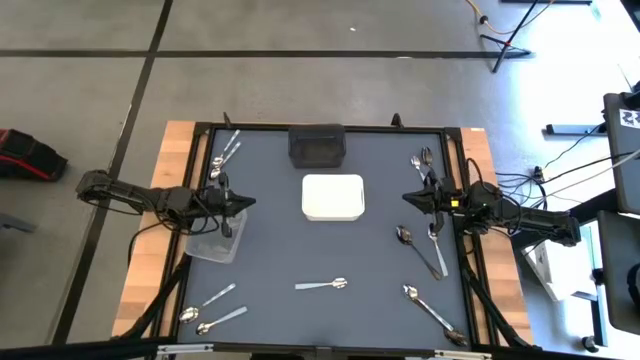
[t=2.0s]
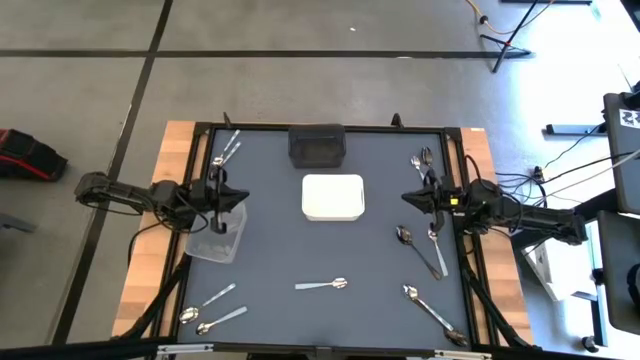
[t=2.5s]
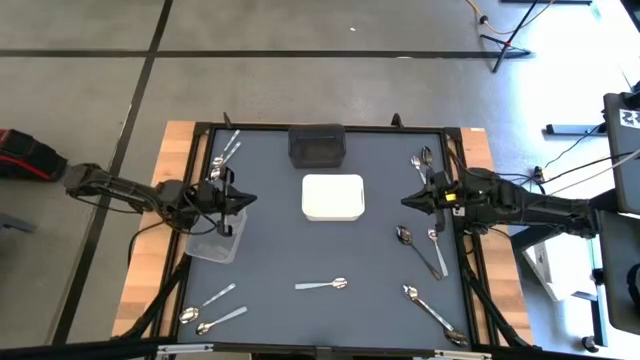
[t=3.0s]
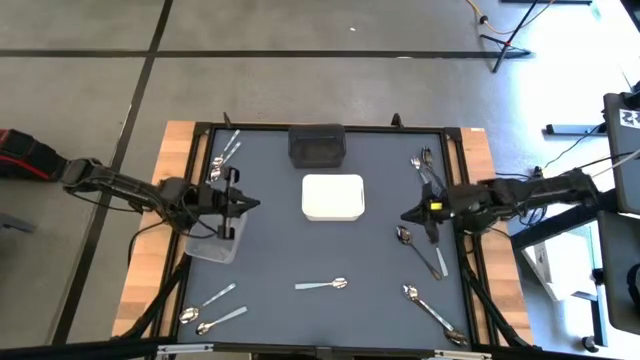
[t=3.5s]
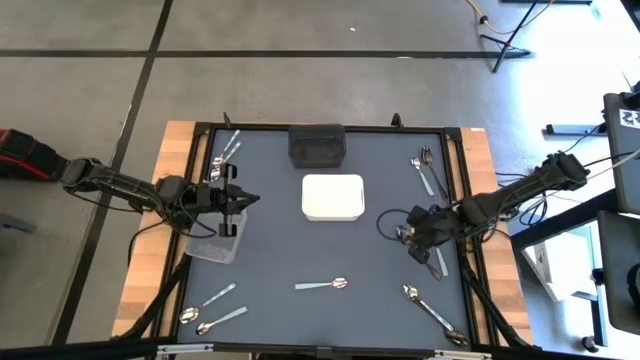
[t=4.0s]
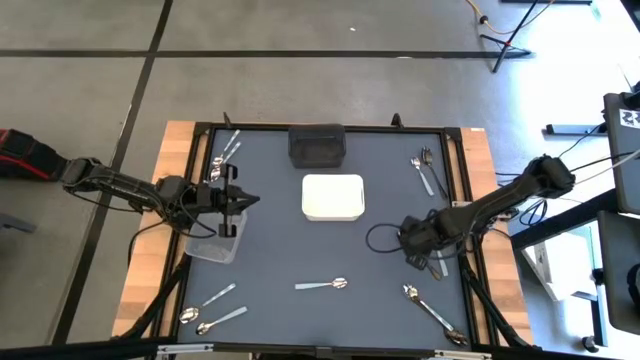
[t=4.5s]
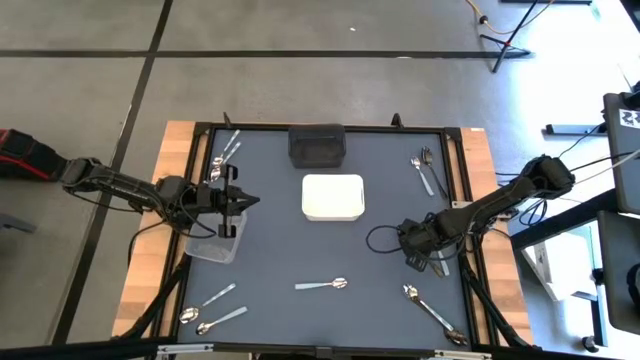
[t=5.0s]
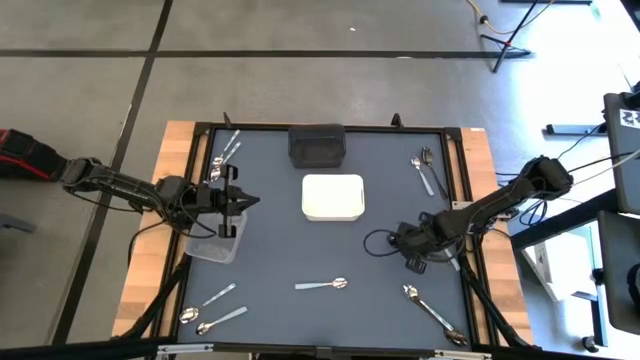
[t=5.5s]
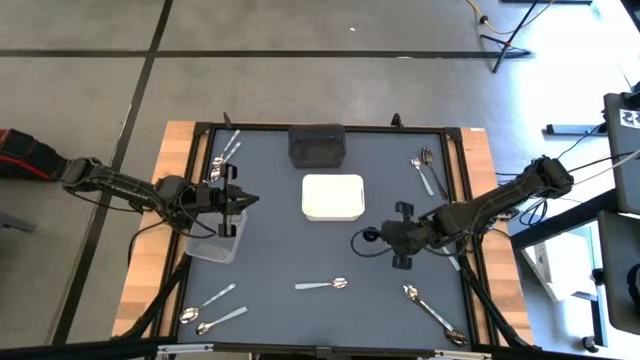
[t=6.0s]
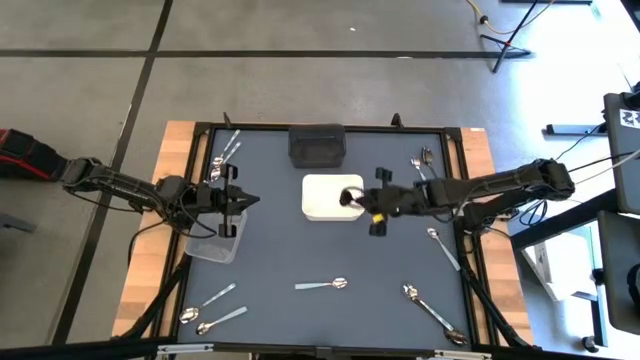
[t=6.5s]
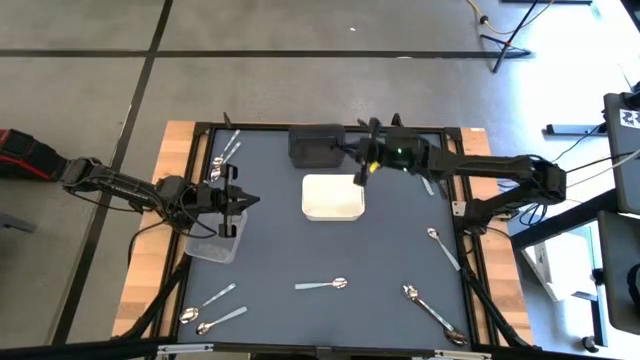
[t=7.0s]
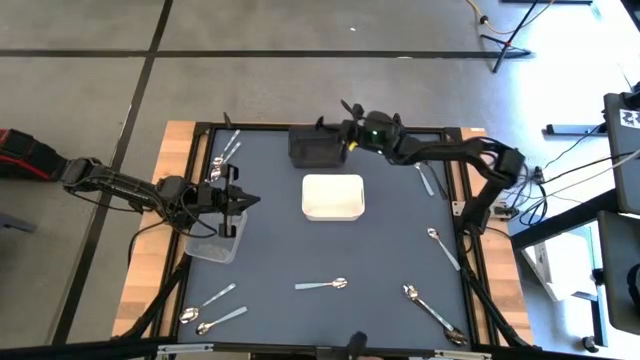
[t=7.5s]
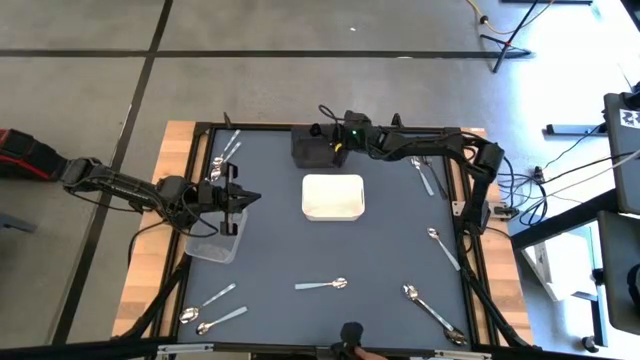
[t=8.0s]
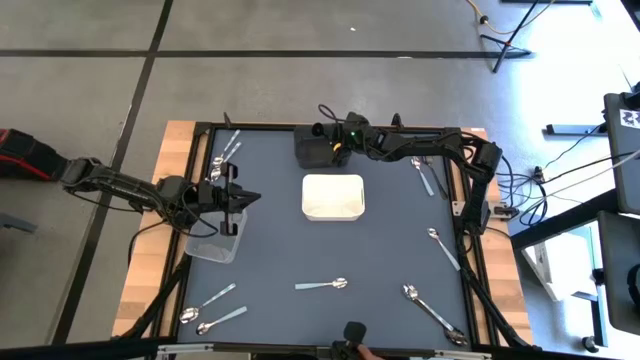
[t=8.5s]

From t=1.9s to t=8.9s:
Task: Sort silverware by color (type)
Put the black spoon into the black bin

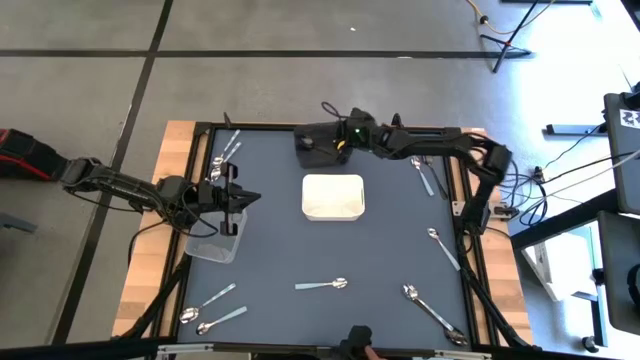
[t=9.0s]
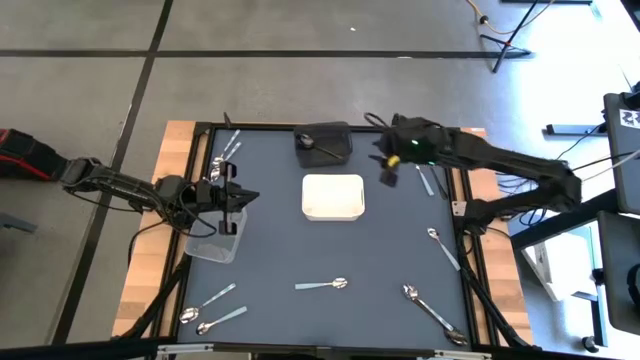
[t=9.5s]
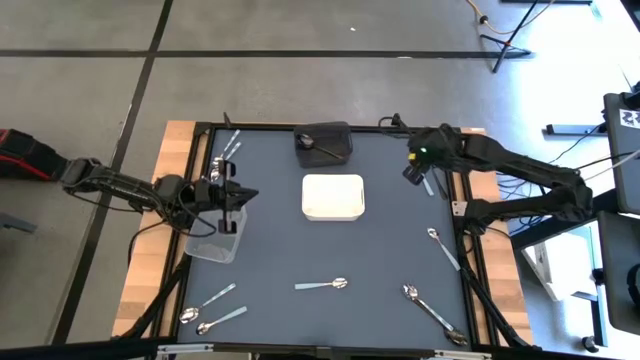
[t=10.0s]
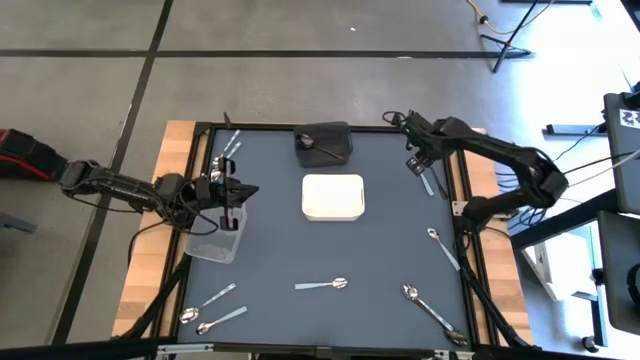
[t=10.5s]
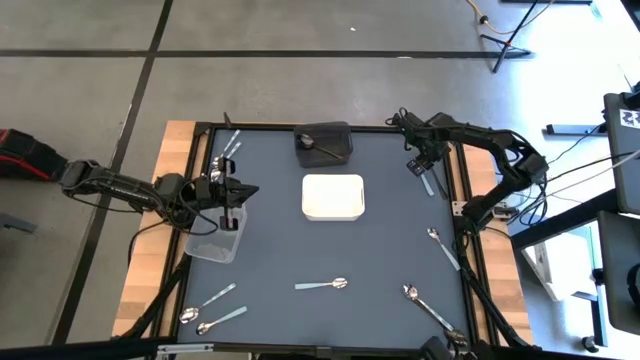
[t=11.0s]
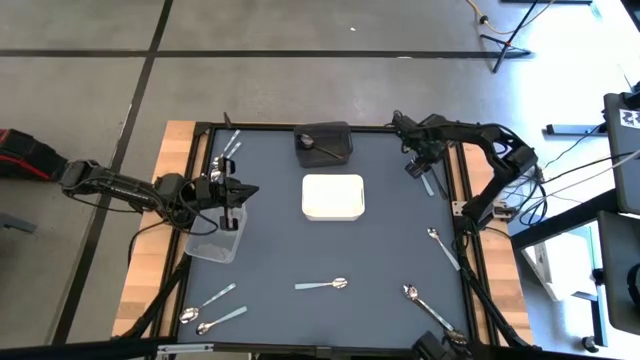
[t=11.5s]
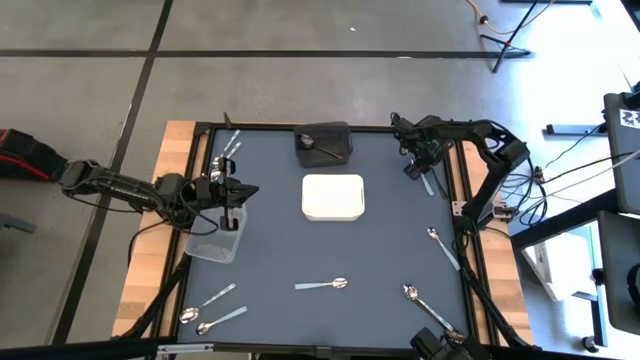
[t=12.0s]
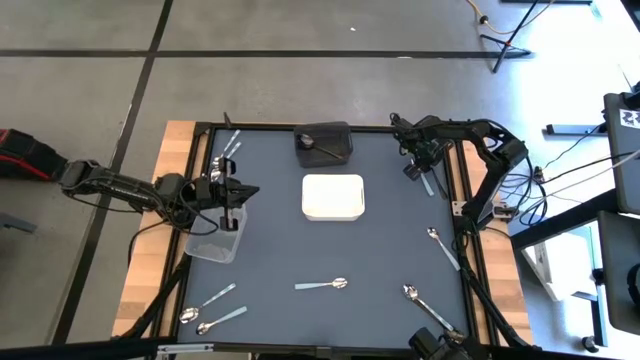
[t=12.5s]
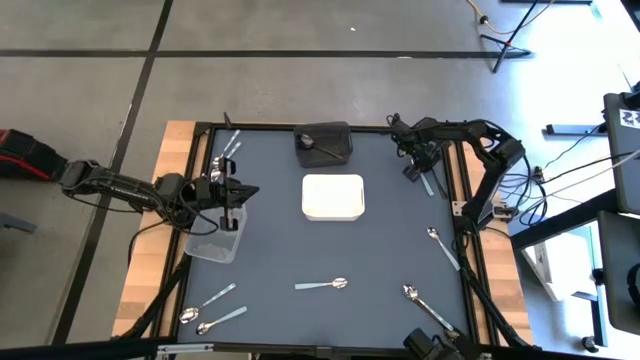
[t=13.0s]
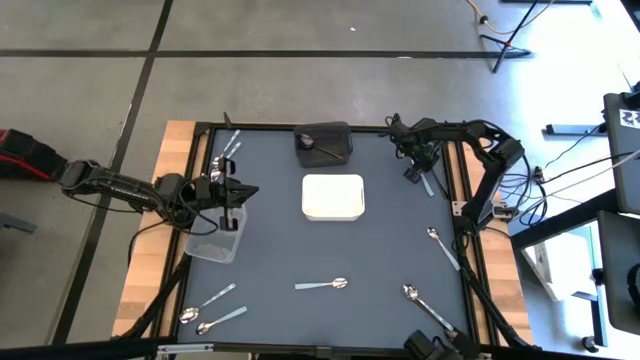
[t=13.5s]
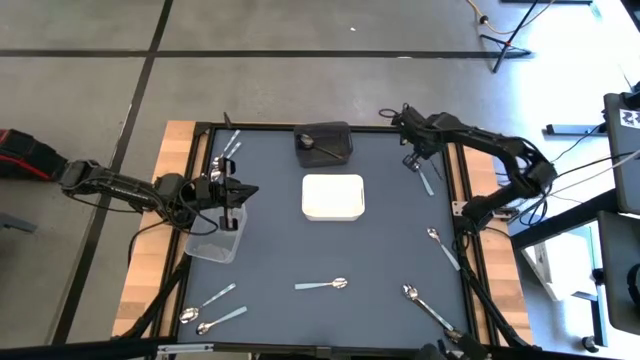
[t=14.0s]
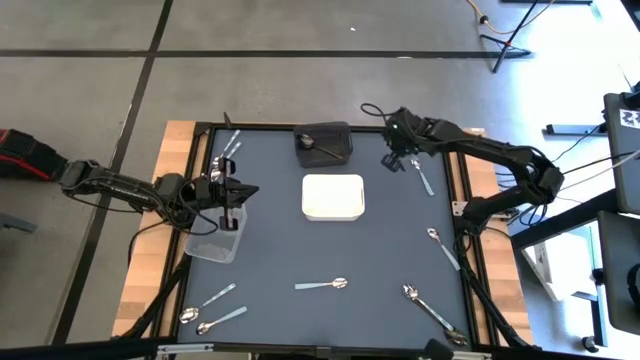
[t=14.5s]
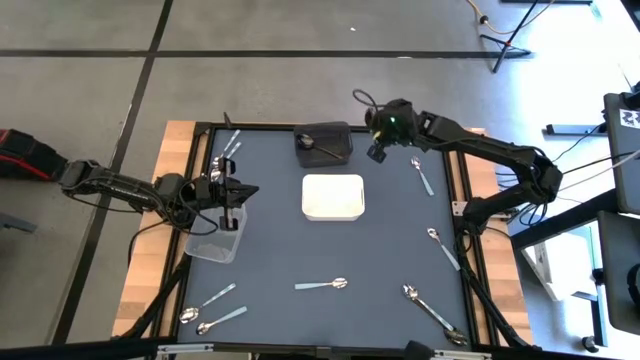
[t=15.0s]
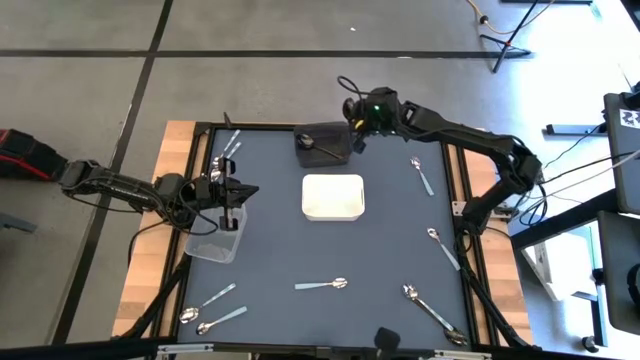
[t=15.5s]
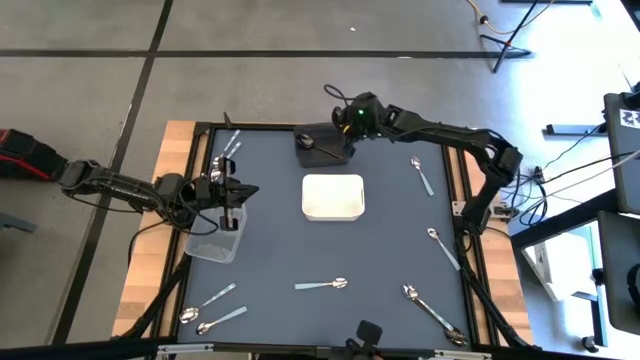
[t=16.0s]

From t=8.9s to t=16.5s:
Put the black spoon into the black bin

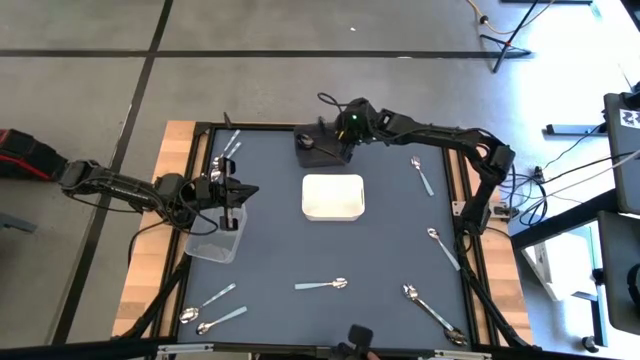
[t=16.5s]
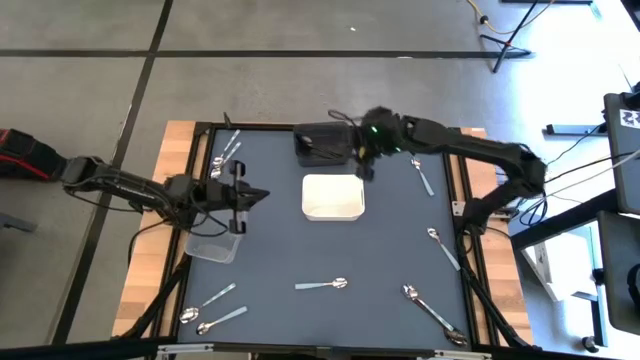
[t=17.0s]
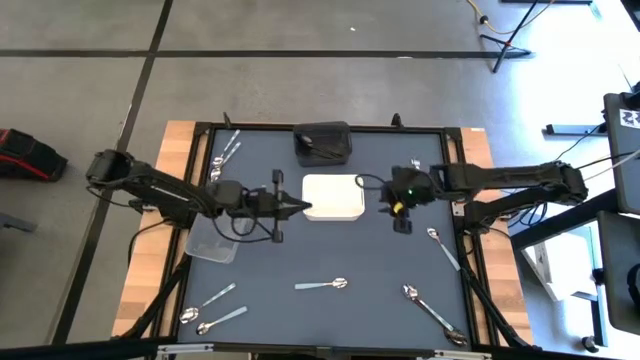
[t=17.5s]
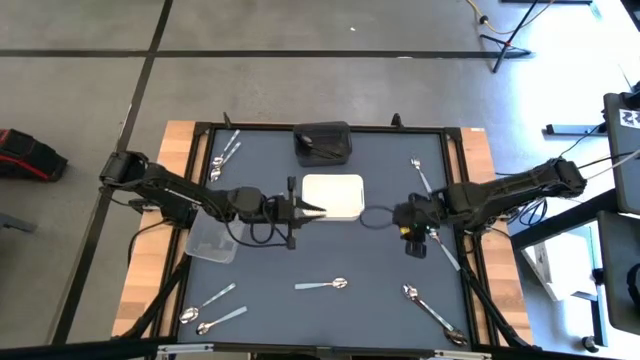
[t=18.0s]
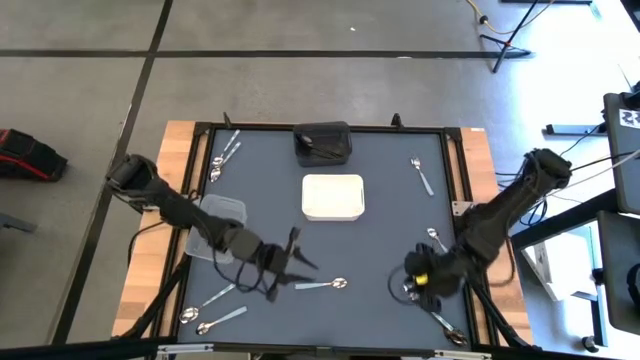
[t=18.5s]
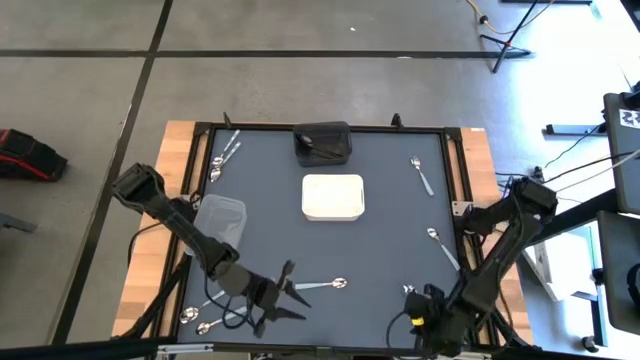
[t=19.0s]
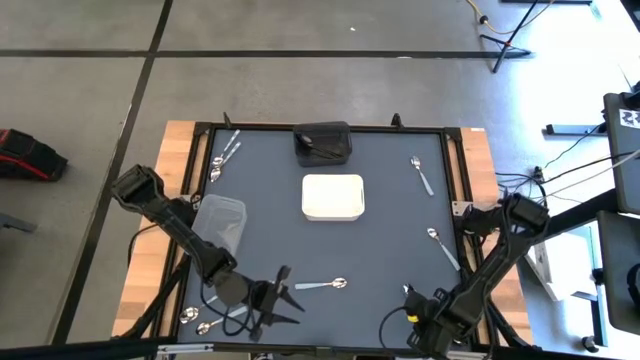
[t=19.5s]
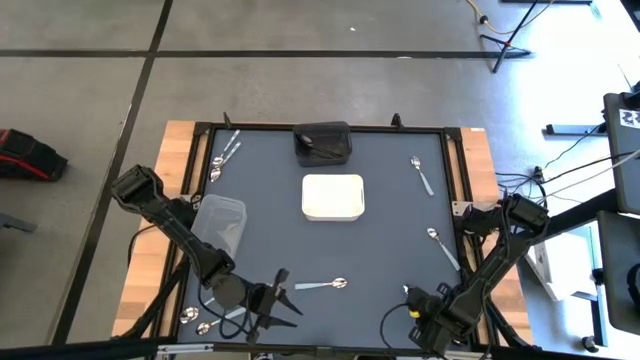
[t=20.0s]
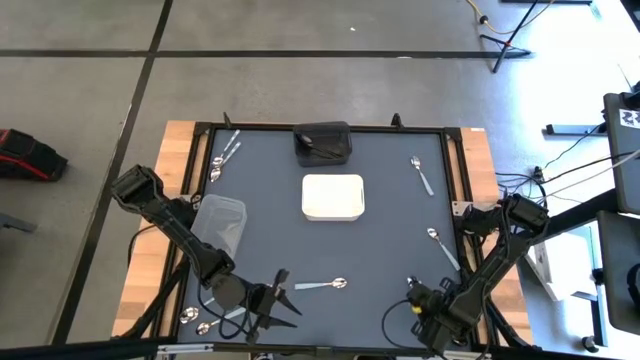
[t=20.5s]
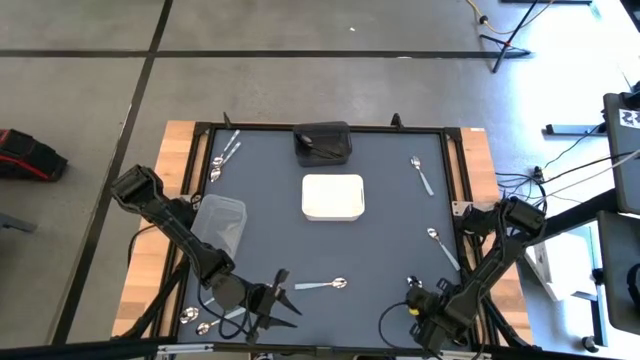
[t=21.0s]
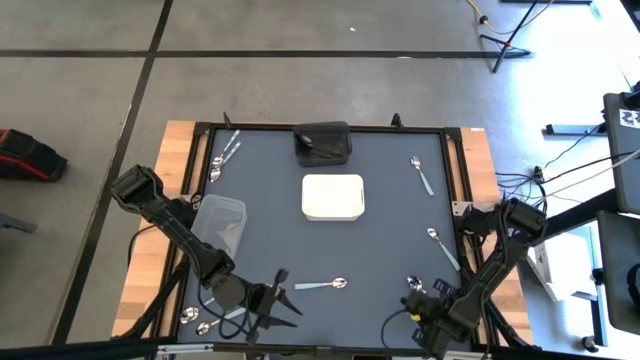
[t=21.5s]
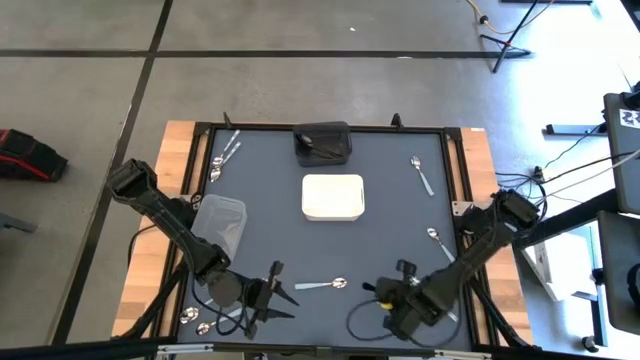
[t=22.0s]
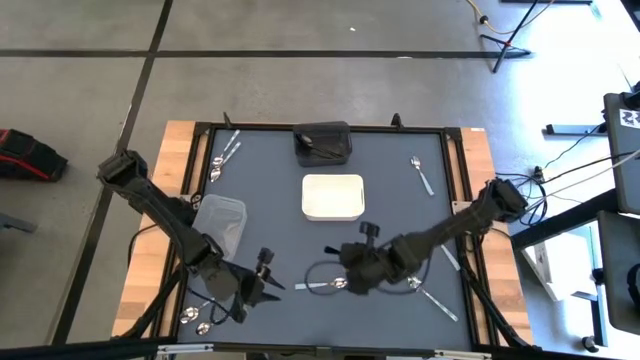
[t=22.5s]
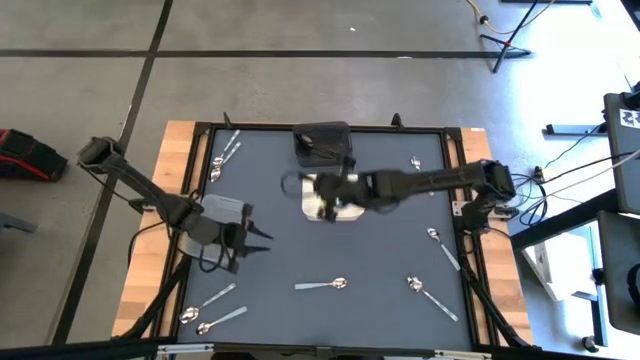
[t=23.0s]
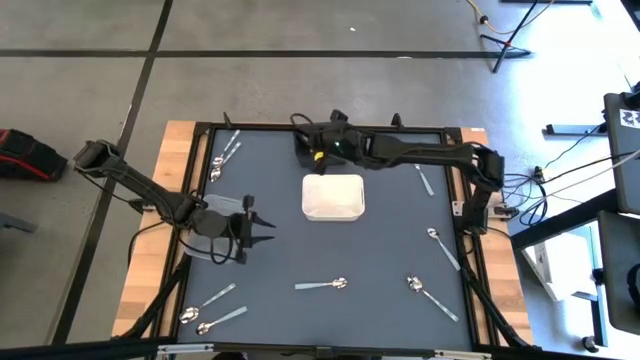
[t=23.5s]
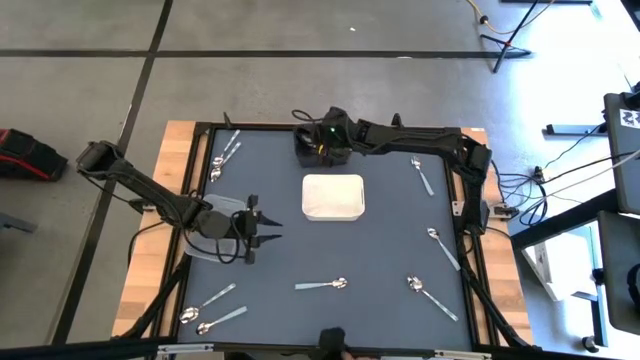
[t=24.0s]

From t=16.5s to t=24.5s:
Put the black spoon into the black bin
